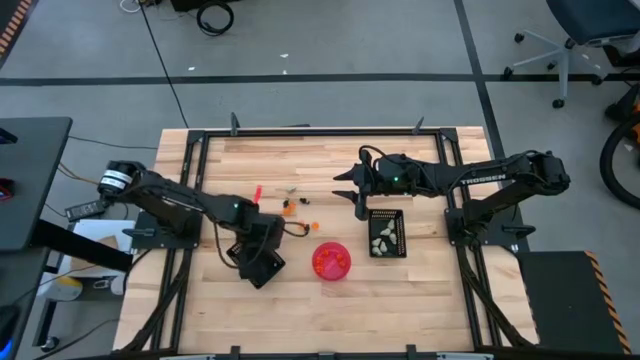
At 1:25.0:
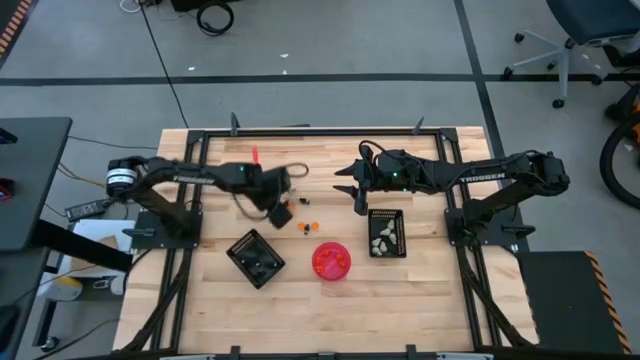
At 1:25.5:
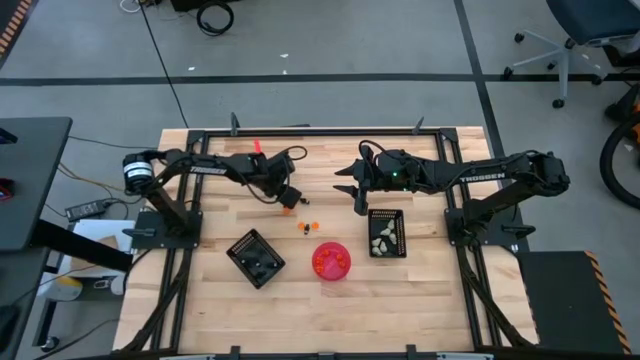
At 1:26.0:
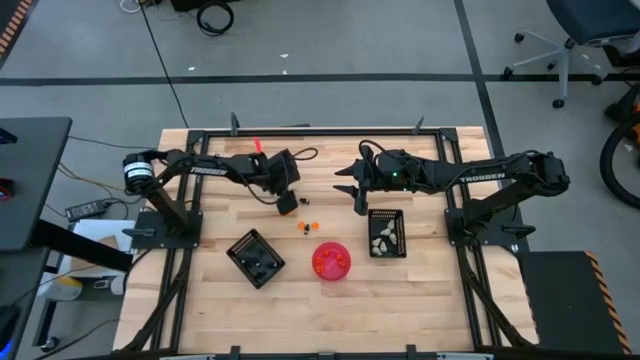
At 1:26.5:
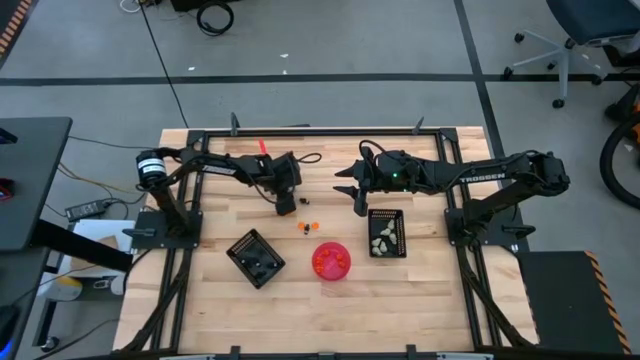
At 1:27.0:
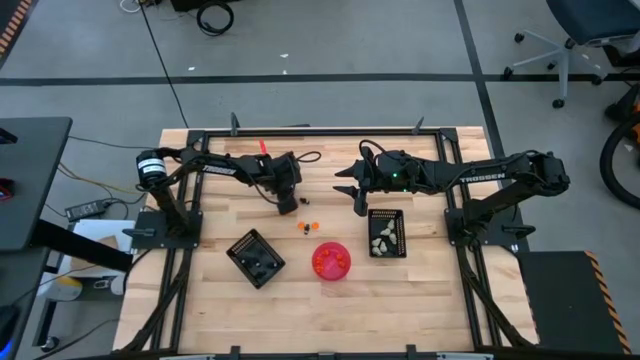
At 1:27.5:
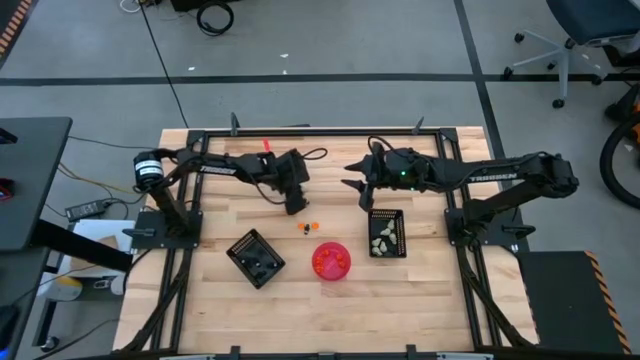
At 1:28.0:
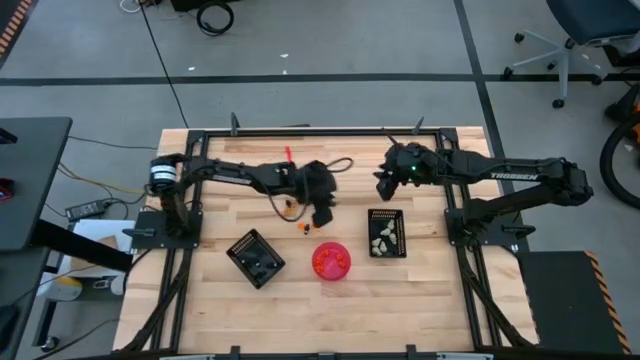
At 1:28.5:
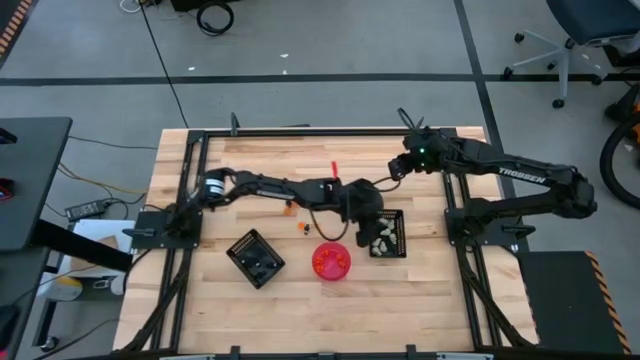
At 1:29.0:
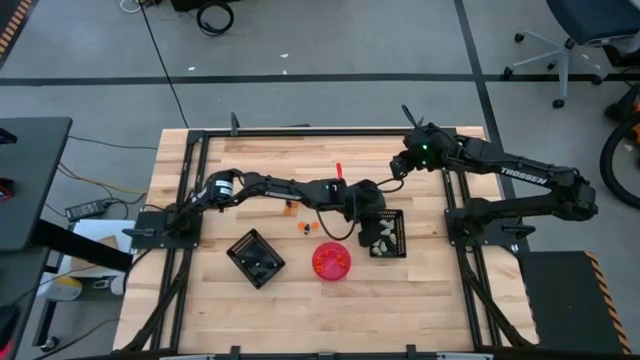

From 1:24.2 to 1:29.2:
Task: Sort Halloween decoration
Put the white skull toy into the top black bin

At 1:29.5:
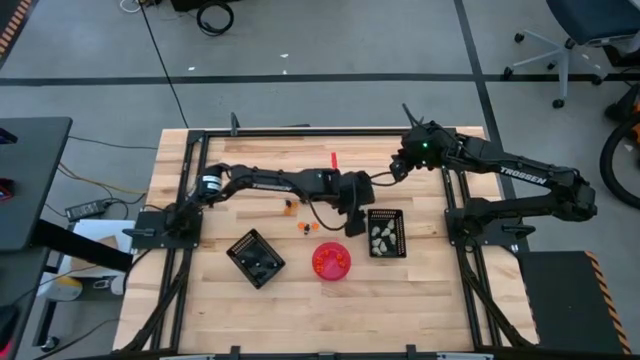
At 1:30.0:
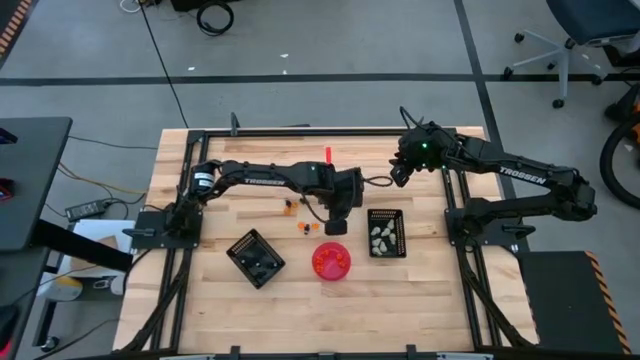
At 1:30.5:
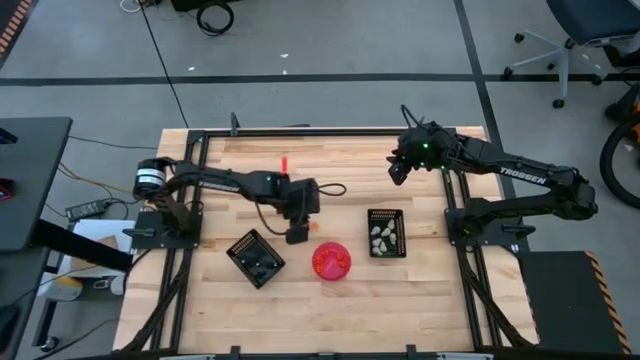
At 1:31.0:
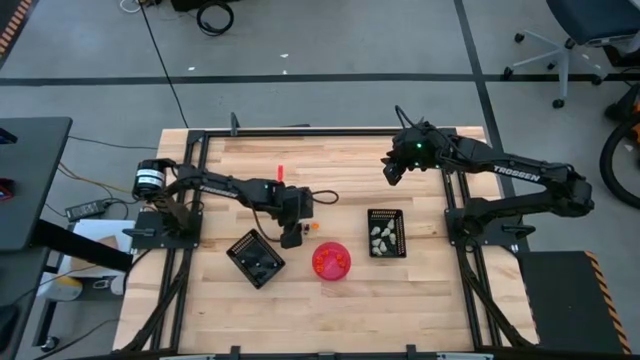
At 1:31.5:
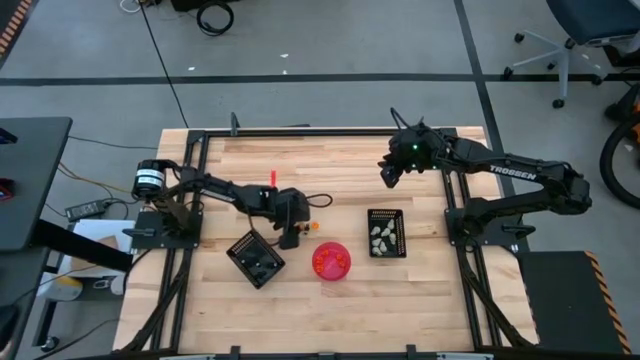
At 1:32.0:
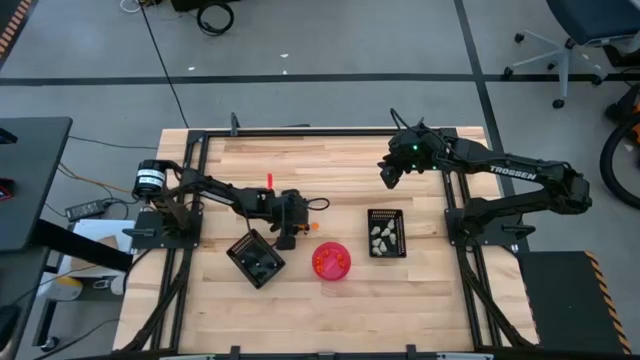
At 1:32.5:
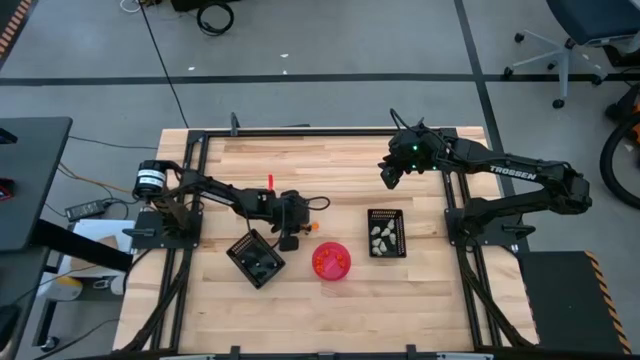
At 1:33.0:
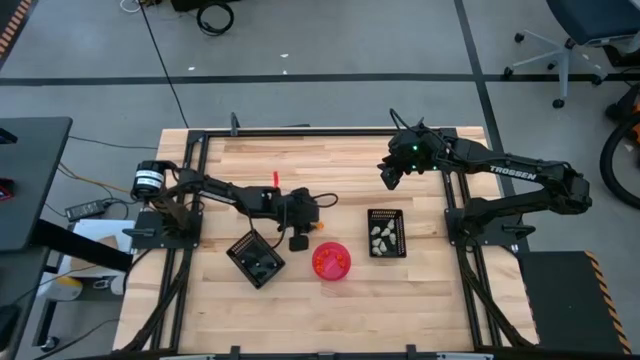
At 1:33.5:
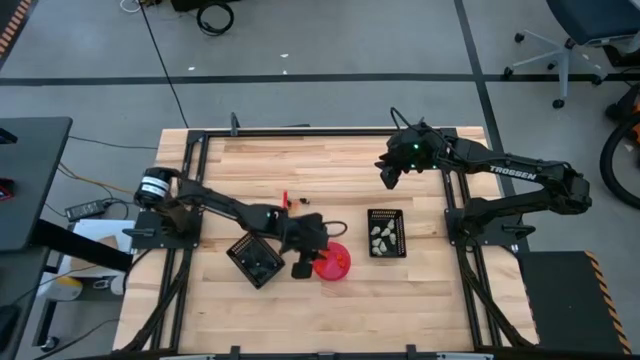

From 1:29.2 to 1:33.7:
Put the orange pumpkin toy into the pink bowl

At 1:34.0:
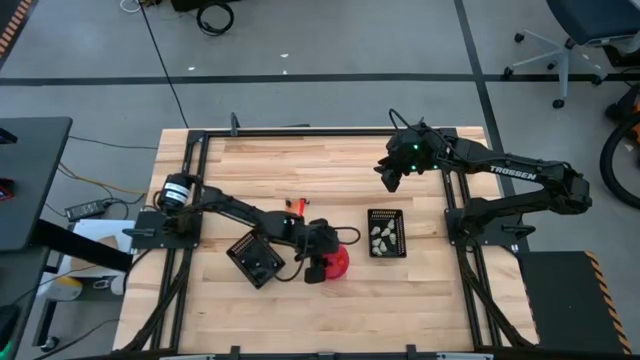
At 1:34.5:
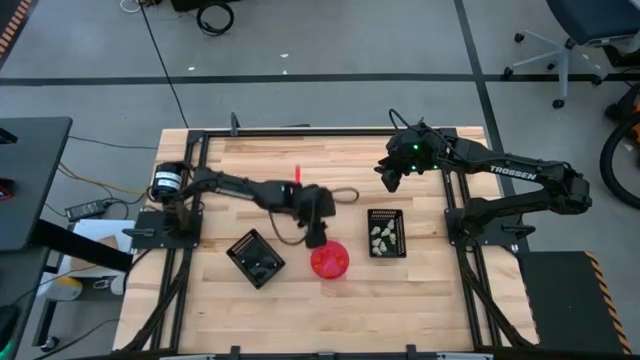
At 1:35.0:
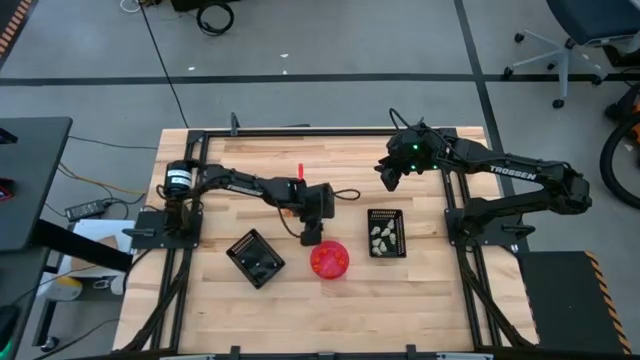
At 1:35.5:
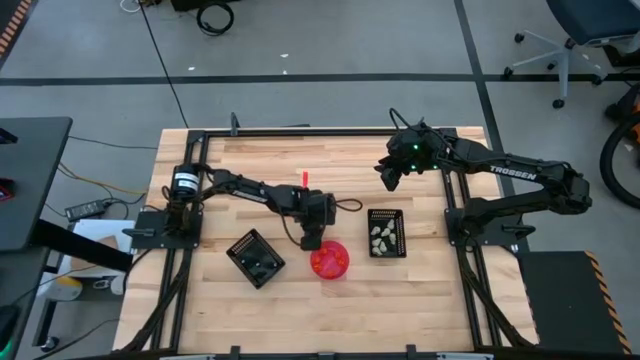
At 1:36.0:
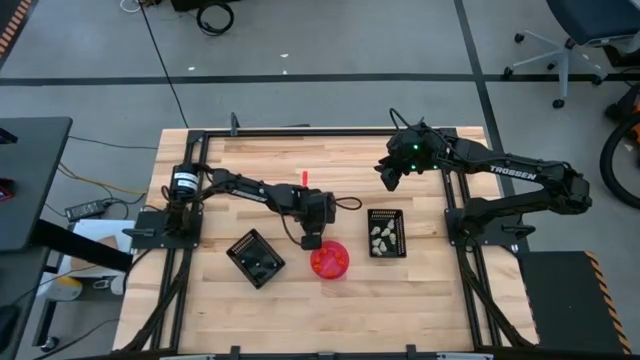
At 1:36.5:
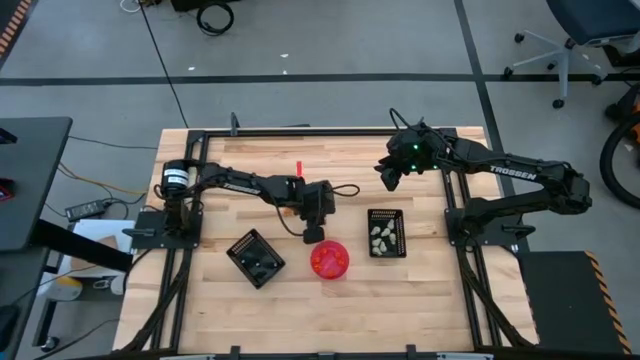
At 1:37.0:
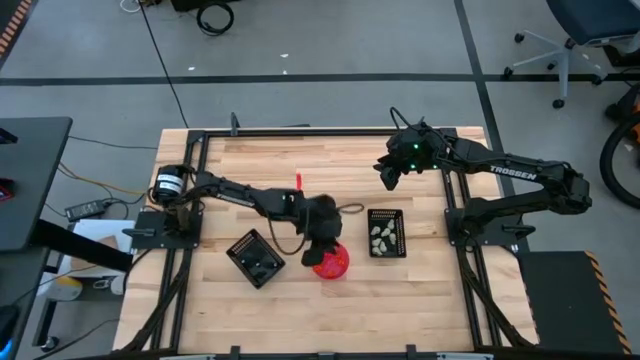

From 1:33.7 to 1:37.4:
Put the orange pumpkin toy into the pink bowl

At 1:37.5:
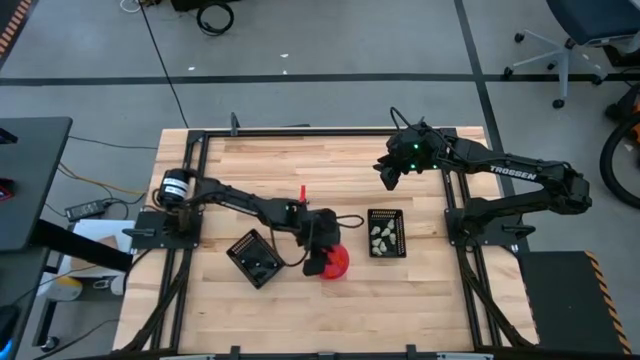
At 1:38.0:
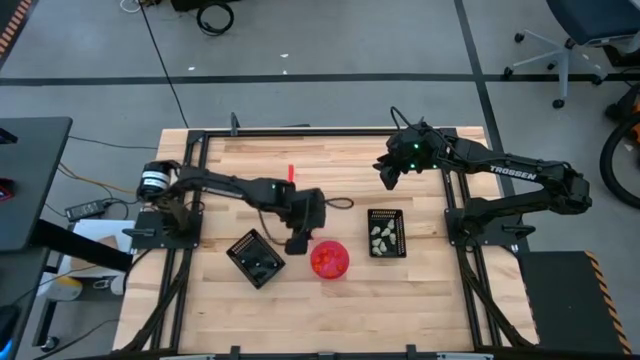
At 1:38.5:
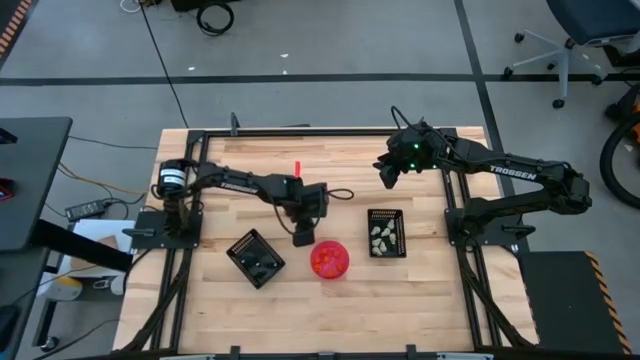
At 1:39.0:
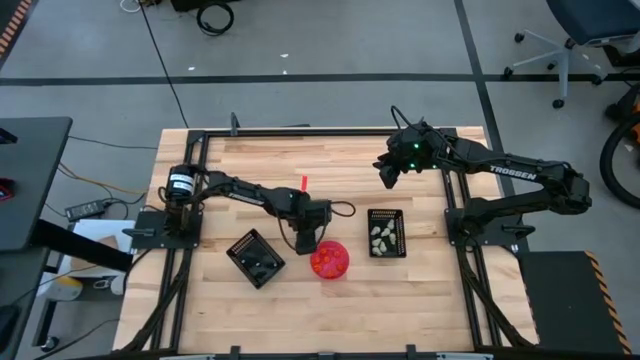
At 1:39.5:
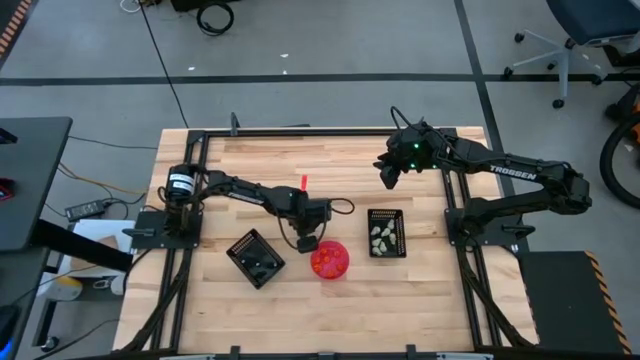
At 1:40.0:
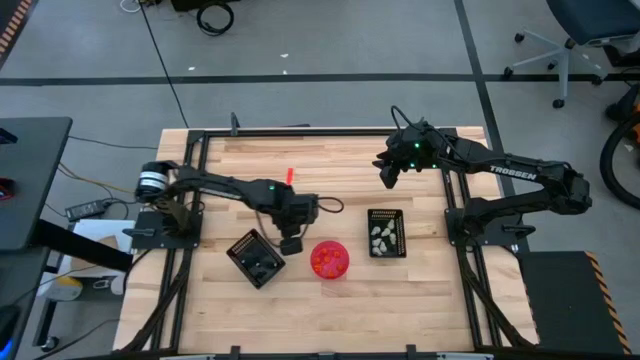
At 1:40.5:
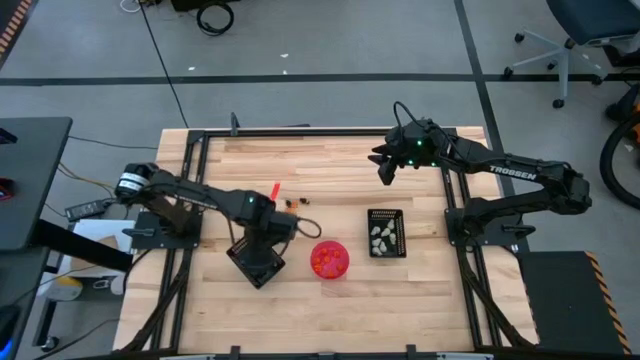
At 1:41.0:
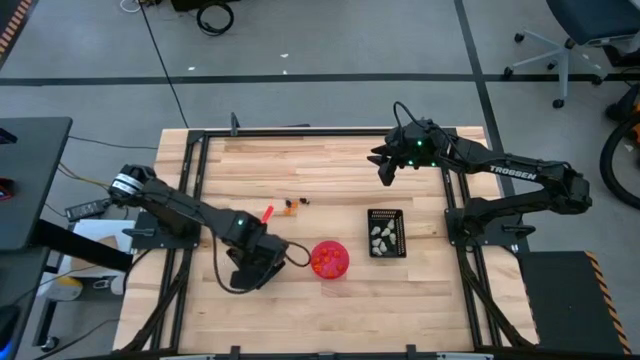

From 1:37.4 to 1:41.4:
Put the black skeleton toy into the bottom black bin

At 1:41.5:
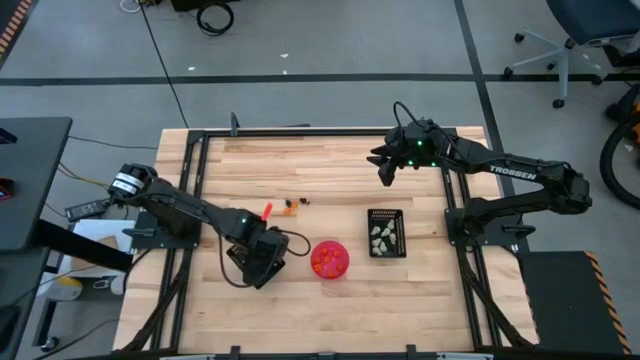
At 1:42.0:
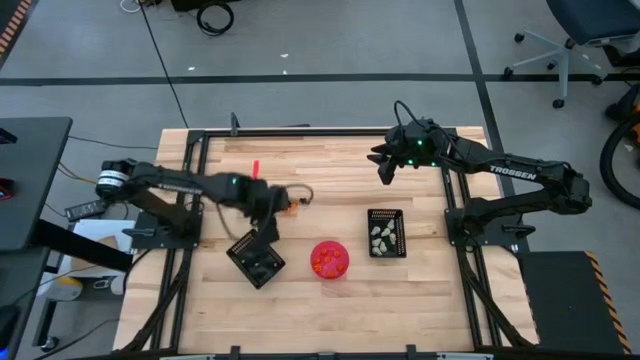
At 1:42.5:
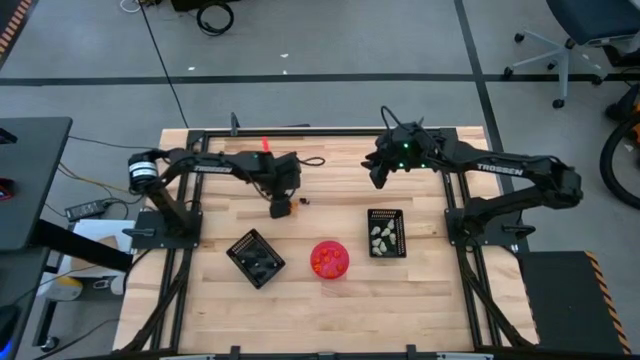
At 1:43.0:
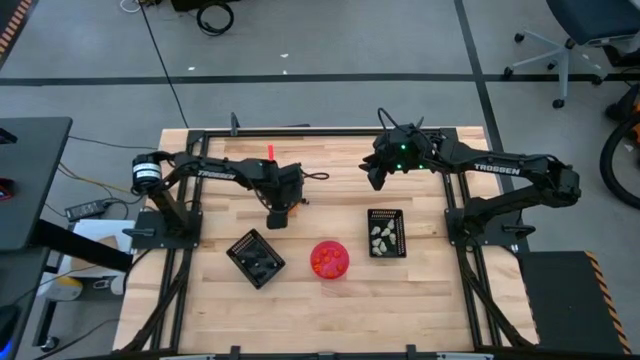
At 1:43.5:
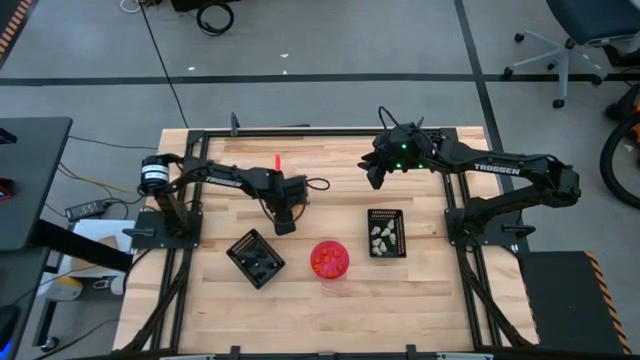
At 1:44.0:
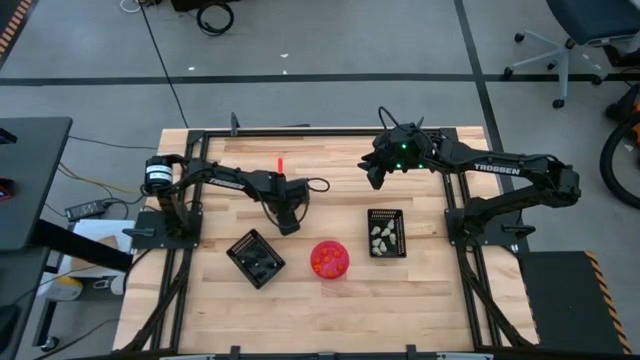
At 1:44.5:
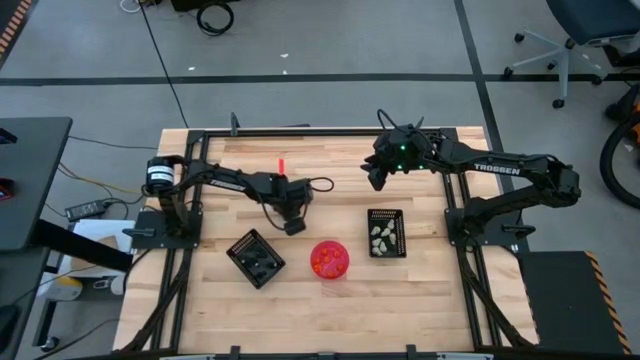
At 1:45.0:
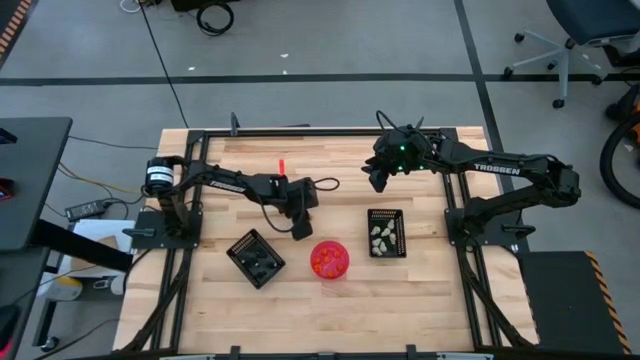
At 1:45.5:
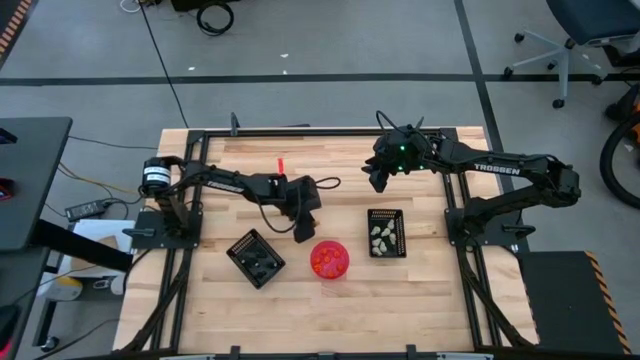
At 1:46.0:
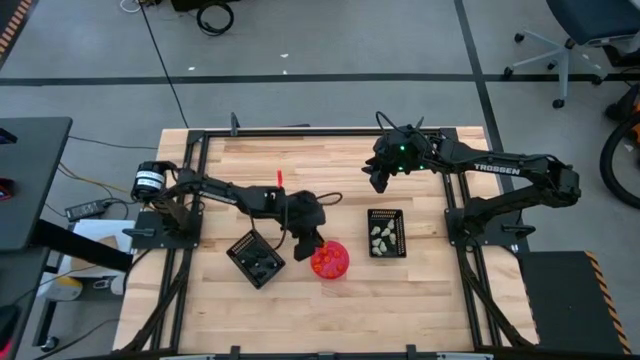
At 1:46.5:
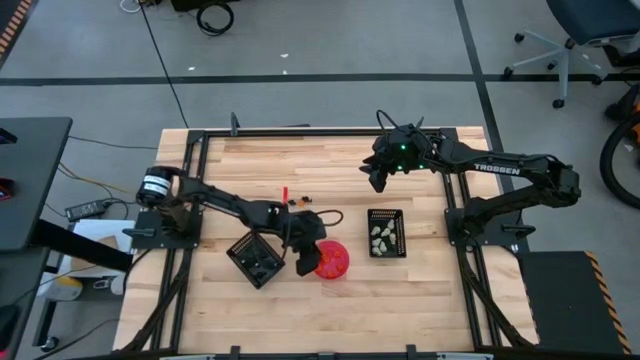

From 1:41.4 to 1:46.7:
Put the orange pumpkin toy into the pink bowl
